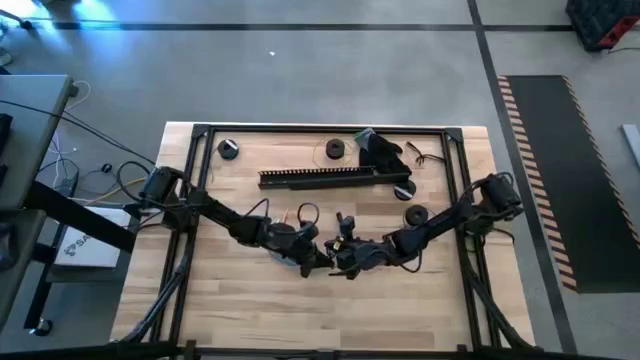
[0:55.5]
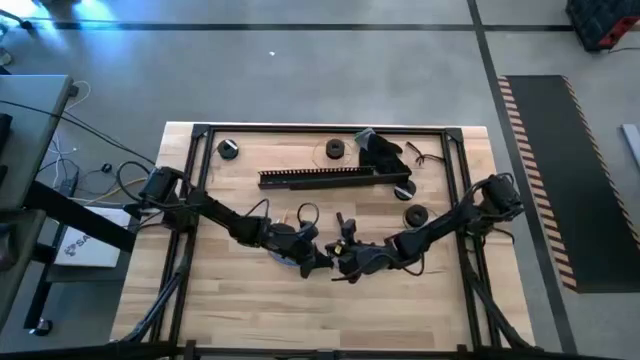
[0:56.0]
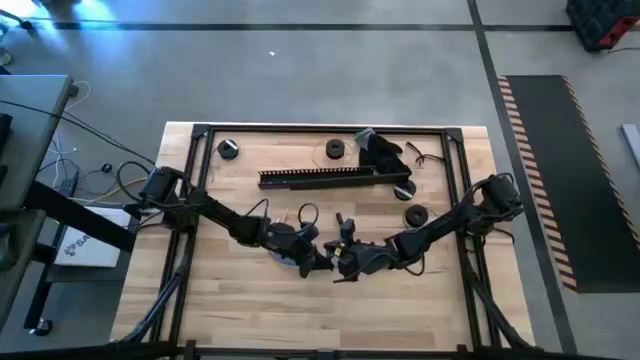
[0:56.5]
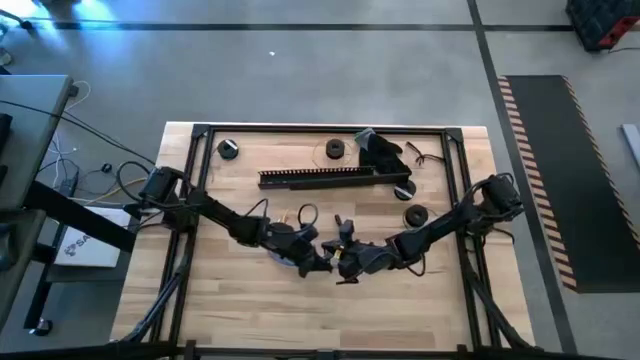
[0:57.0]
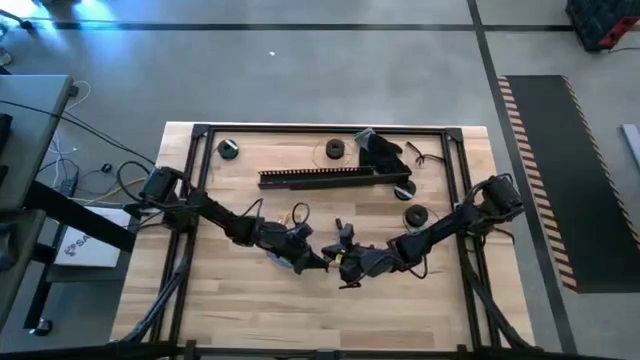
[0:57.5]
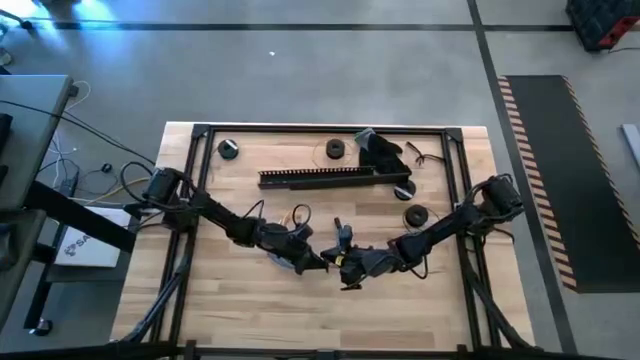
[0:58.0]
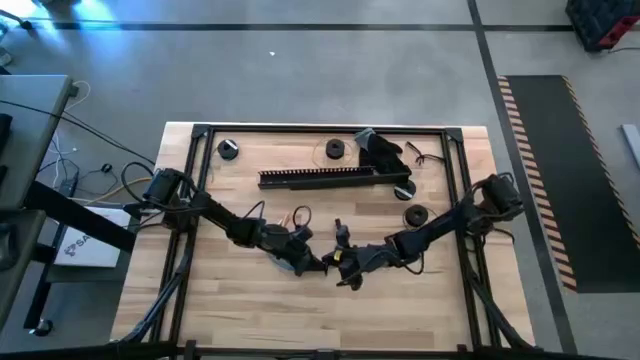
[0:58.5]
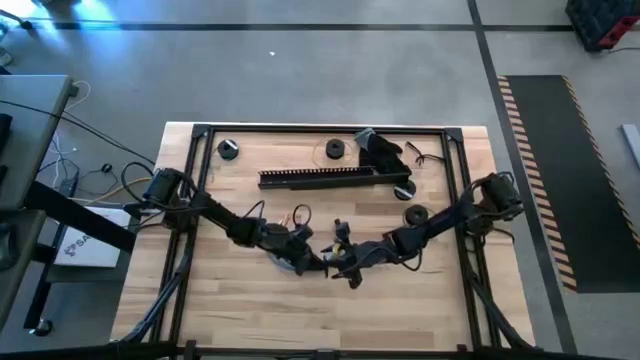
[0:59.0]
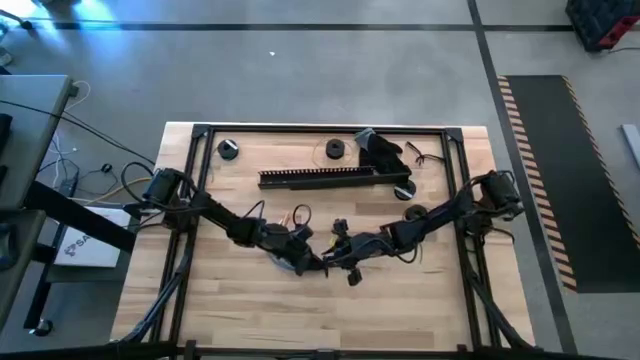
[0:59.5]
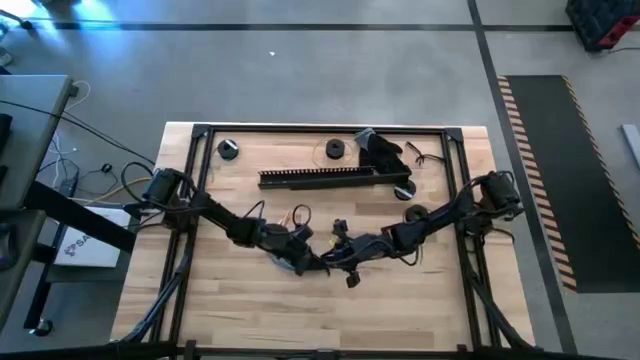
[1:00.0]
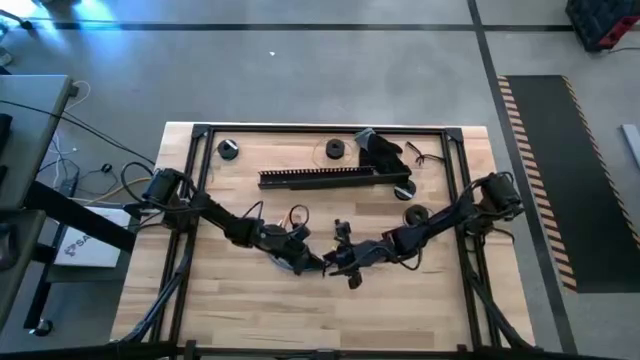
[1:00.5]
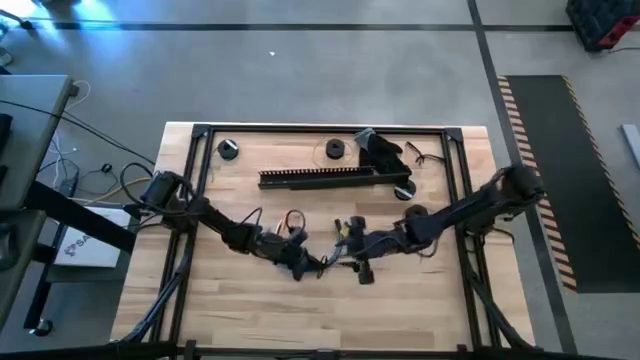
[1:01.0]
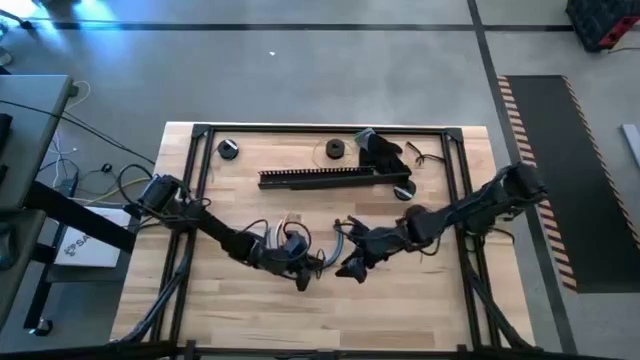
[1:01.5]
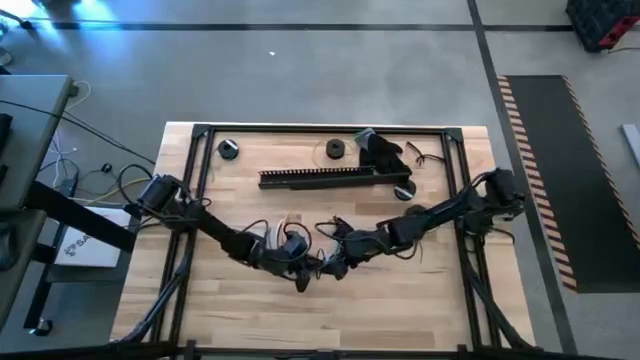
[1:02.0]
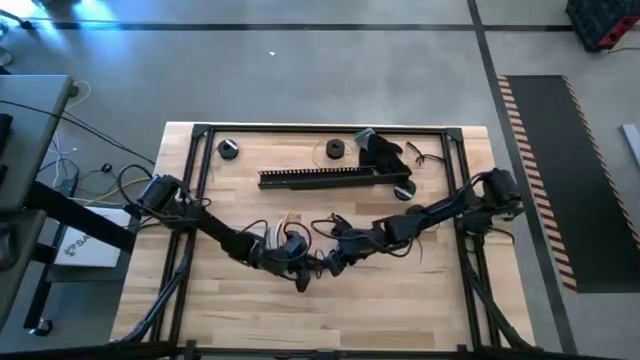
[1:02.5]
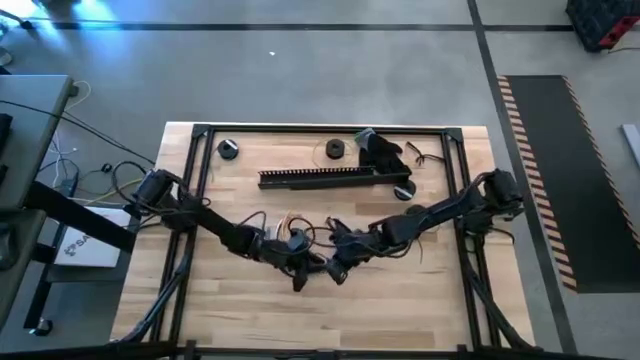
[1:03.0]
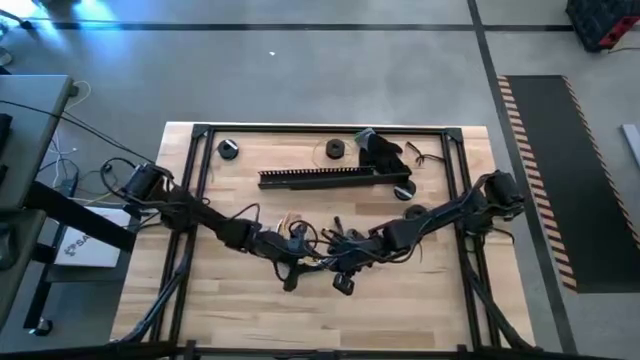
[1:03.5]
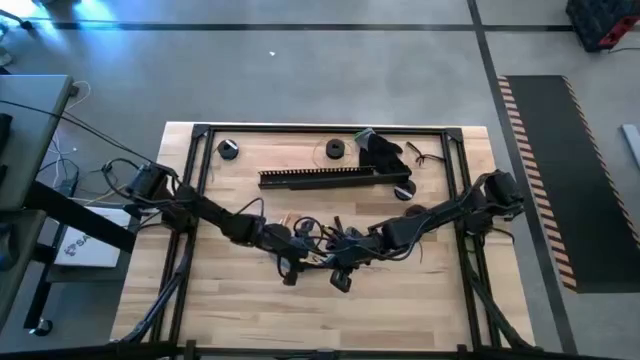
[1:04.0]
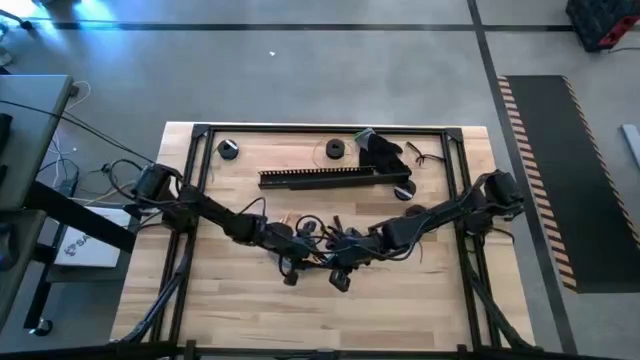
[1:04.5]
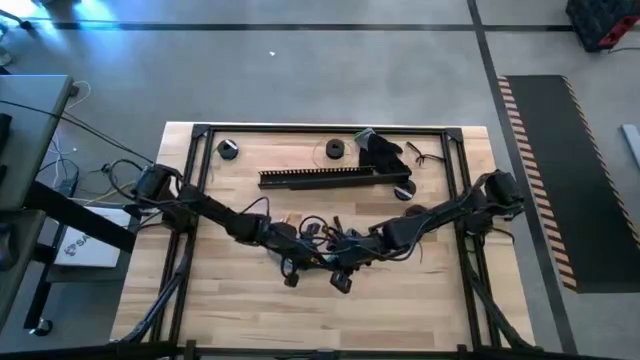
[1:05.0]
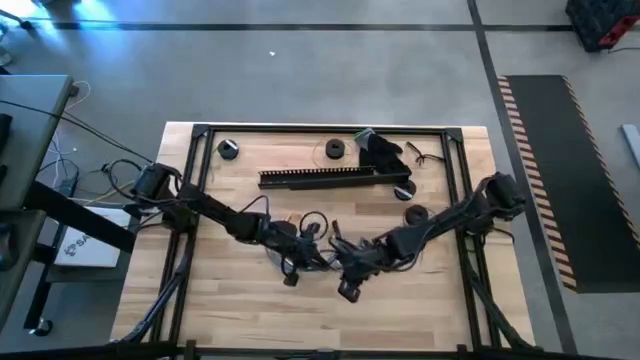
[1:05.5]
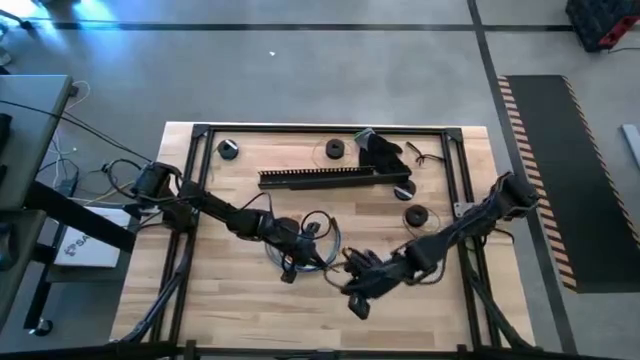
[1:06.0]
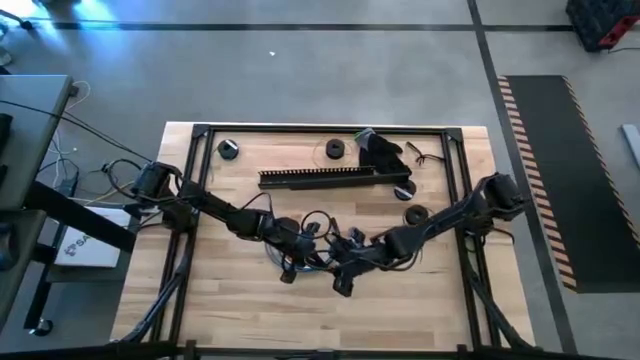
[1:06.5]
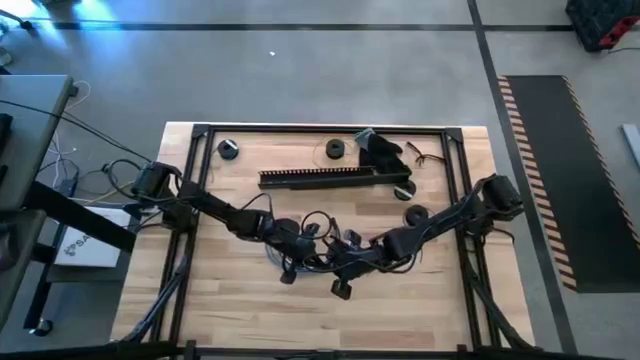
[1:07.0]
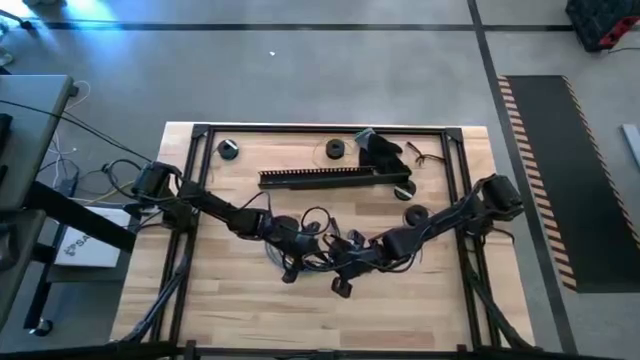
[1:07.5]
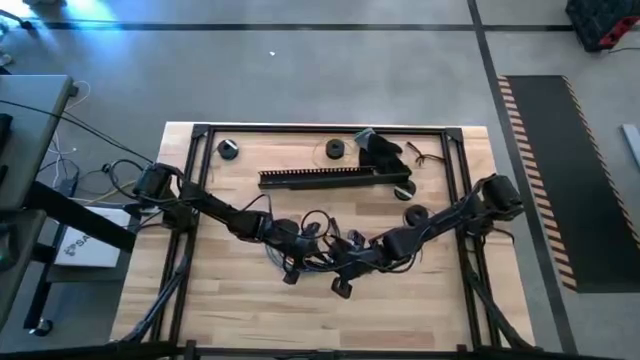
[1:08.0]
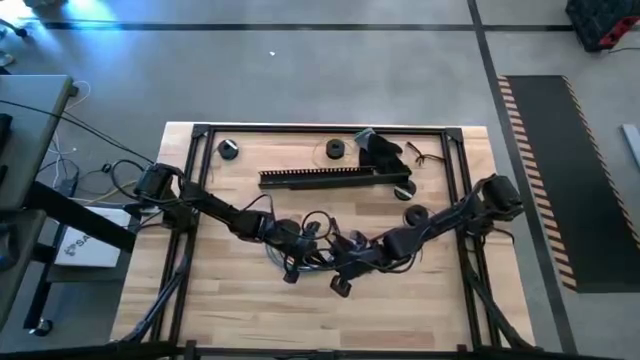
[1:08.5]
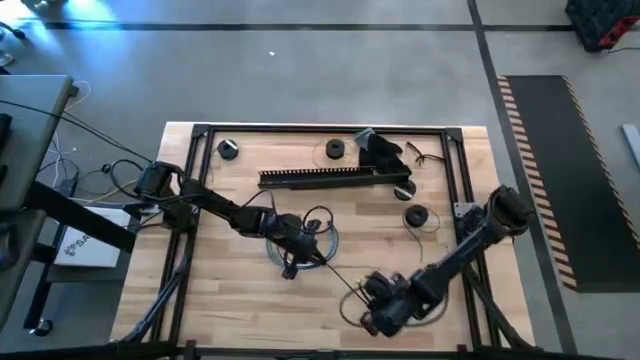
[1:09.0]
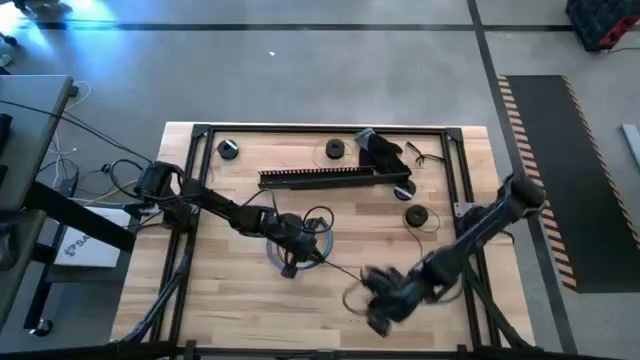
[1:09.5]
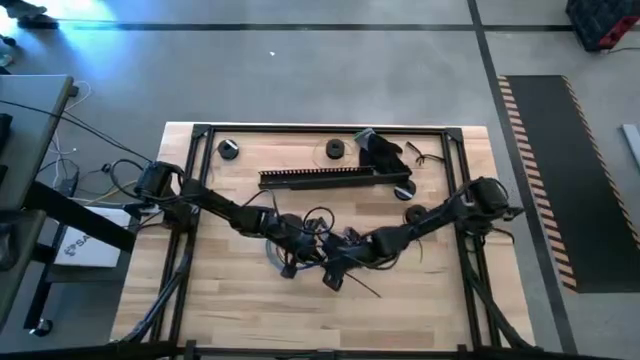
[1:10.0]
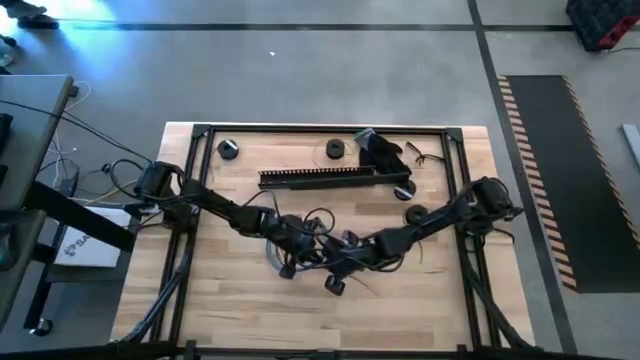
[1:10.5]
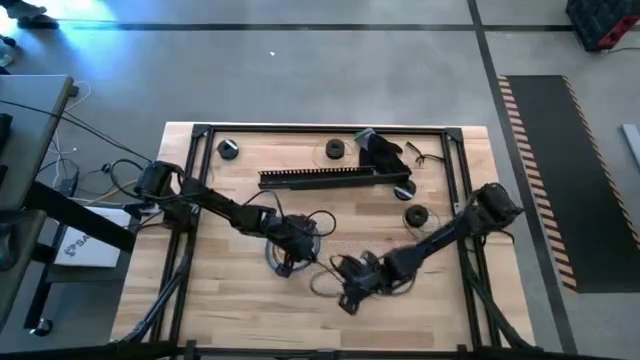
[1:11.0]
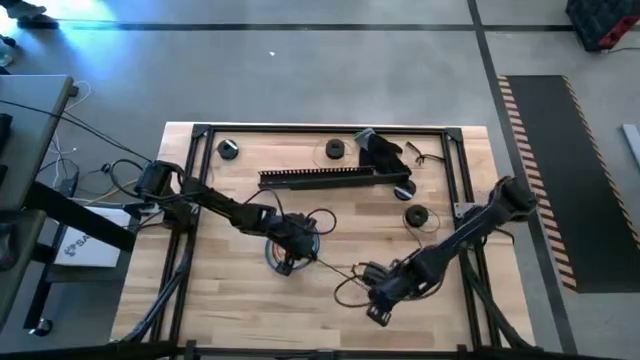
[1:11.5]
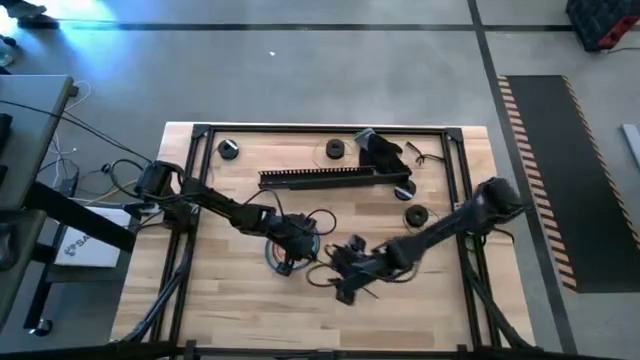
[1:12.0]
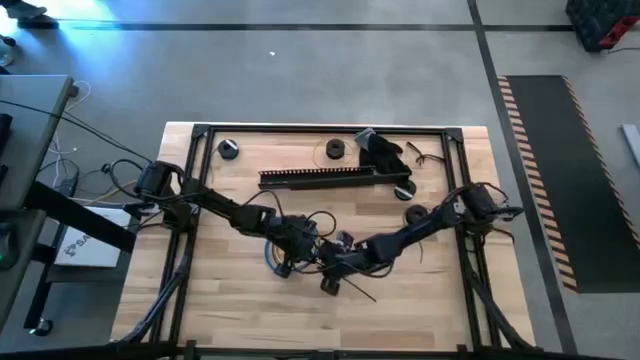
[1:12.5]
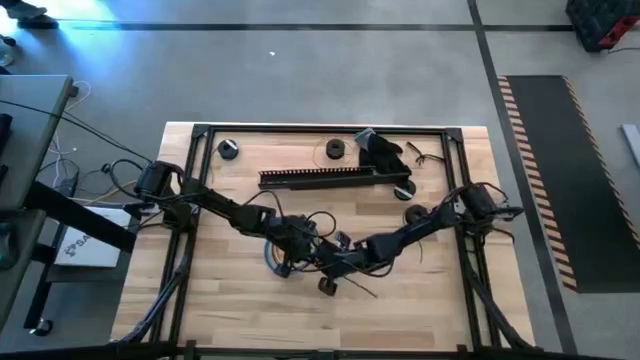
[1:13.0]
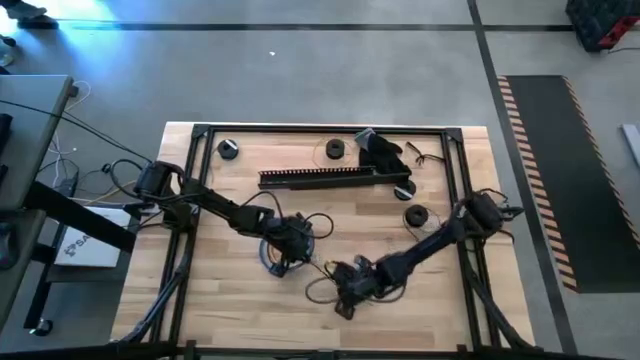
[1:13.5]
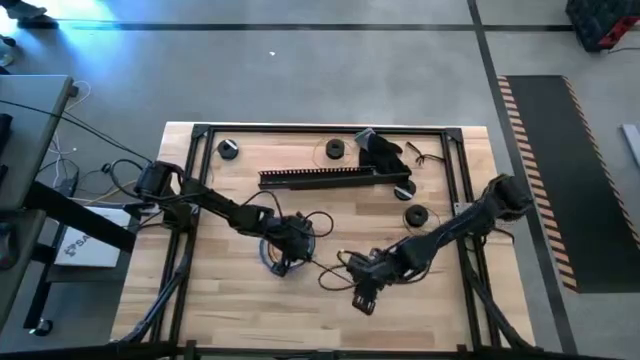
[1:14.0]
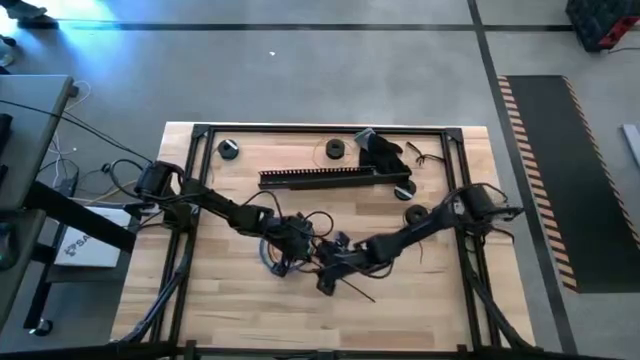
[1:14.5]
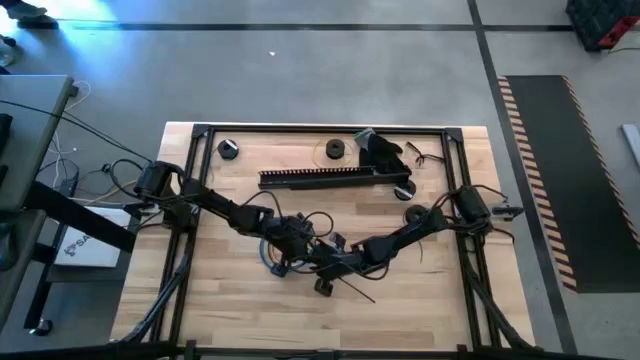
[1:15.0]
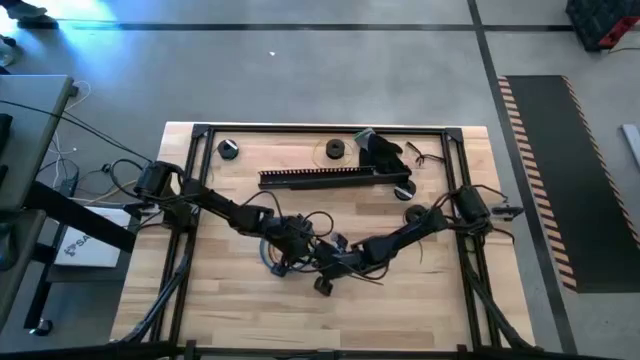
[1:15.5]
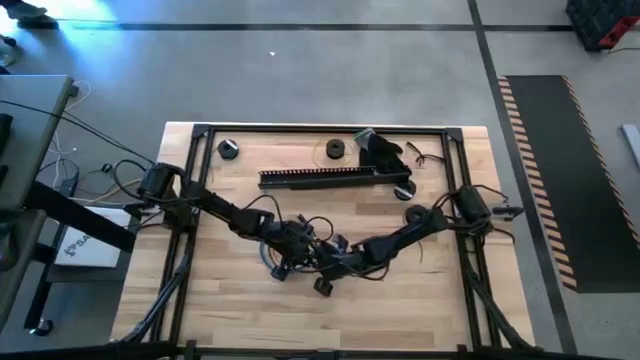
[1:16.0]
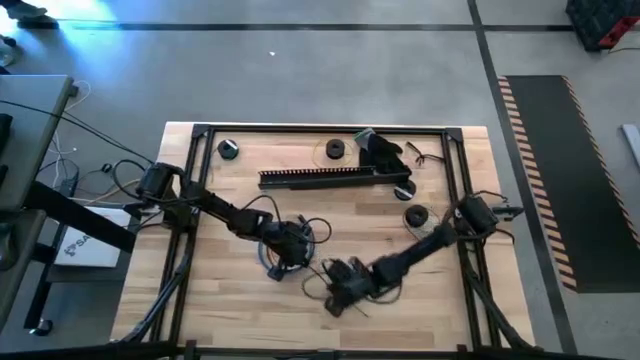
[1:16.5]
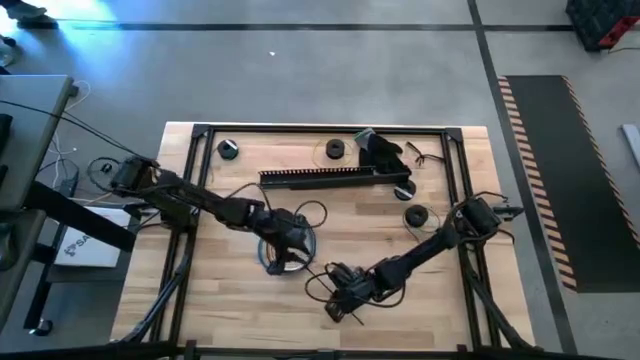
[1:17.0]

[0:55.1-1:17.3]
Task: Ziptie cables
Wrap the black zip tie around the cables
